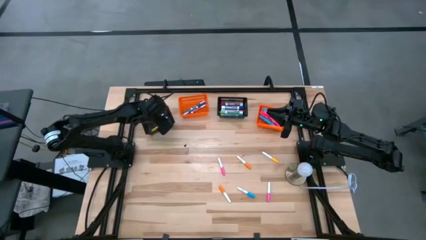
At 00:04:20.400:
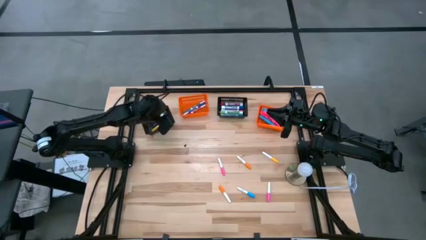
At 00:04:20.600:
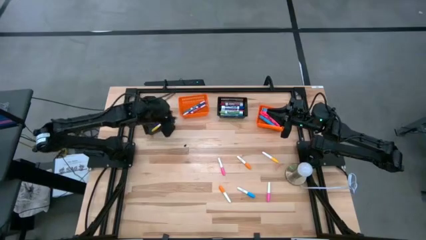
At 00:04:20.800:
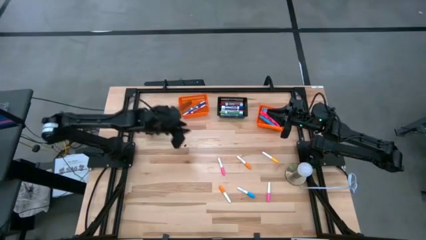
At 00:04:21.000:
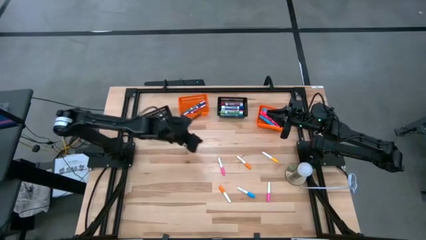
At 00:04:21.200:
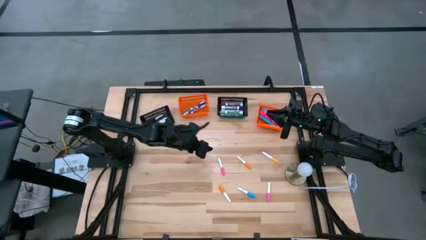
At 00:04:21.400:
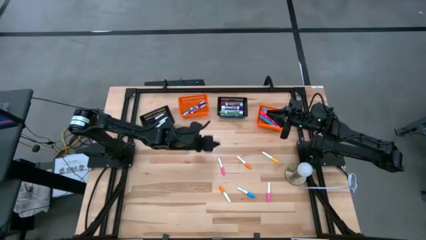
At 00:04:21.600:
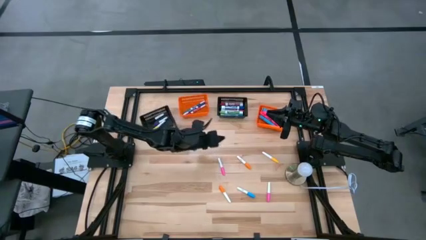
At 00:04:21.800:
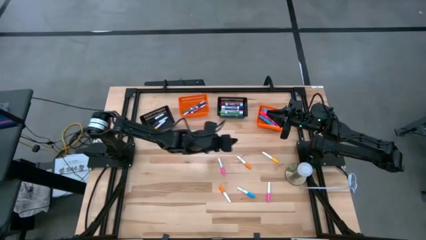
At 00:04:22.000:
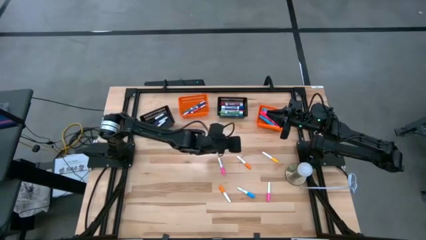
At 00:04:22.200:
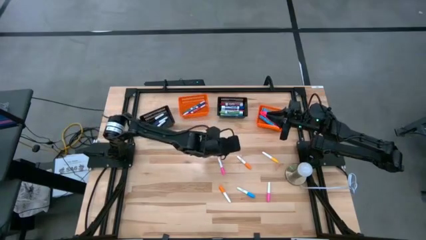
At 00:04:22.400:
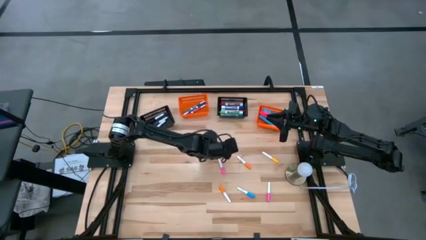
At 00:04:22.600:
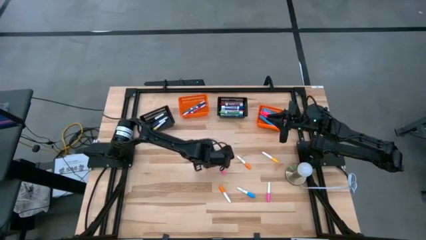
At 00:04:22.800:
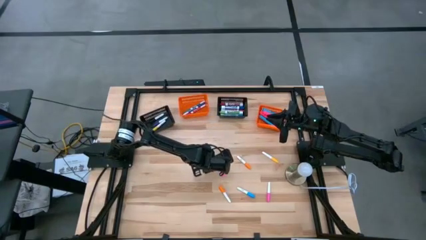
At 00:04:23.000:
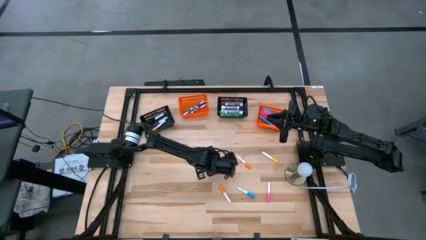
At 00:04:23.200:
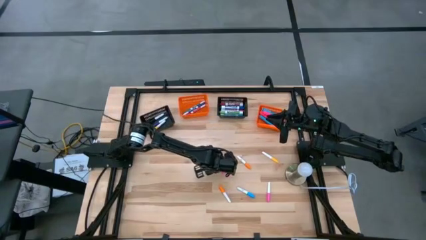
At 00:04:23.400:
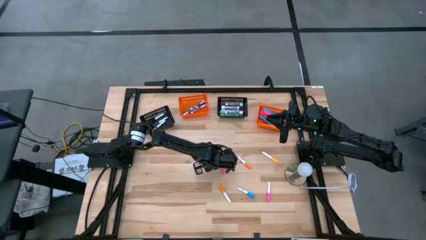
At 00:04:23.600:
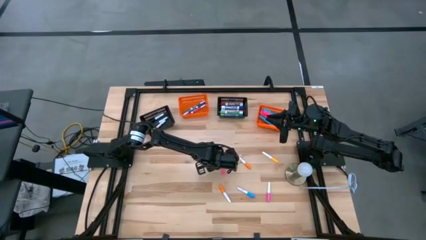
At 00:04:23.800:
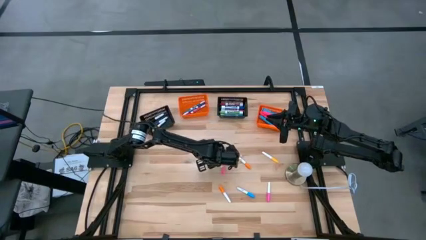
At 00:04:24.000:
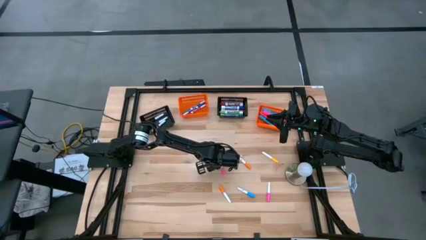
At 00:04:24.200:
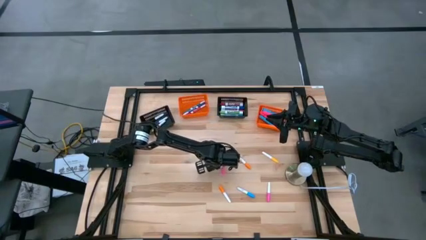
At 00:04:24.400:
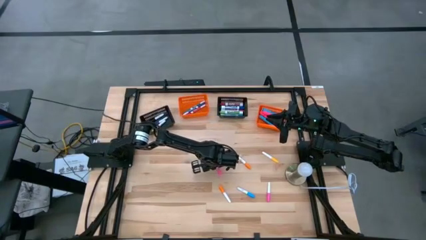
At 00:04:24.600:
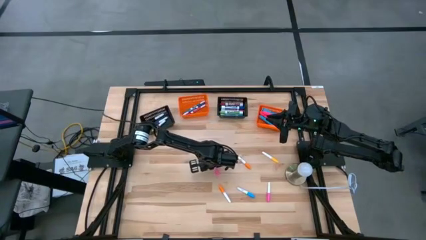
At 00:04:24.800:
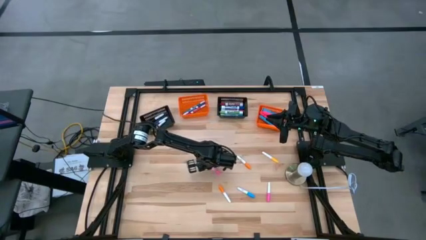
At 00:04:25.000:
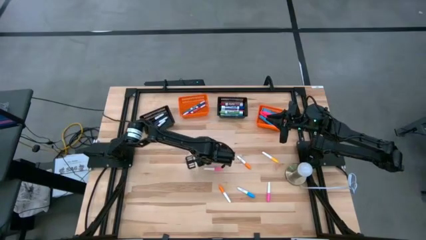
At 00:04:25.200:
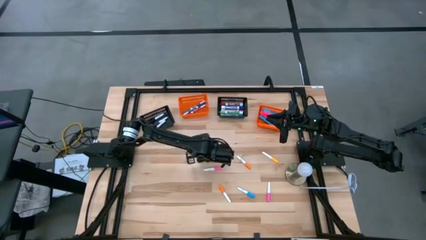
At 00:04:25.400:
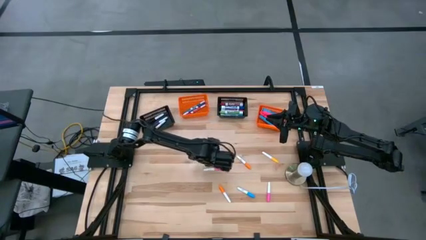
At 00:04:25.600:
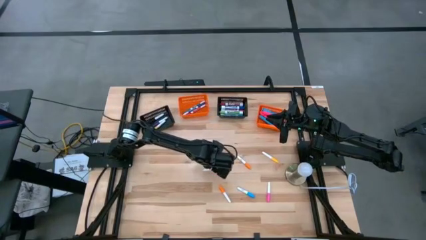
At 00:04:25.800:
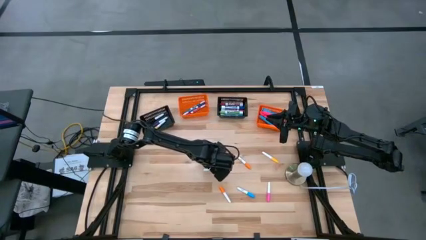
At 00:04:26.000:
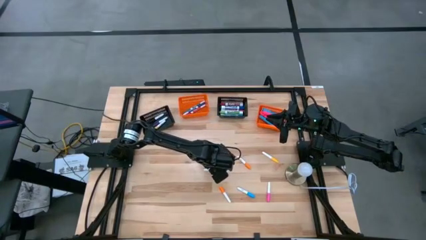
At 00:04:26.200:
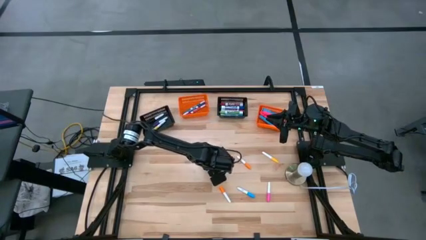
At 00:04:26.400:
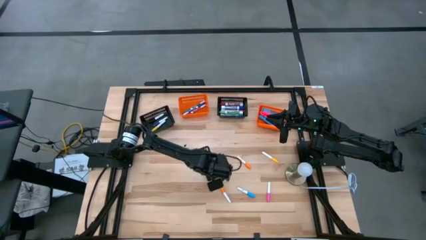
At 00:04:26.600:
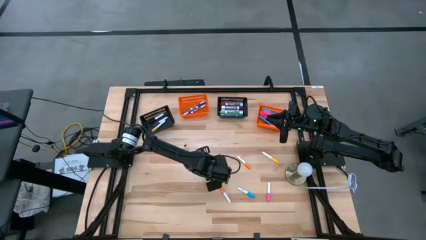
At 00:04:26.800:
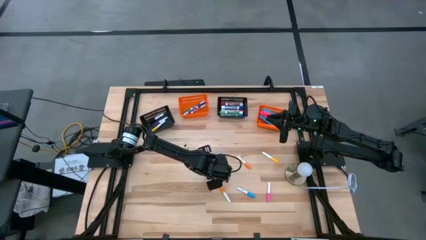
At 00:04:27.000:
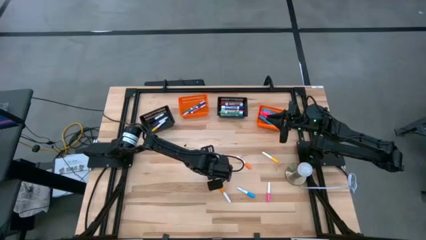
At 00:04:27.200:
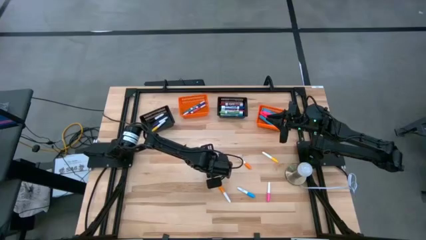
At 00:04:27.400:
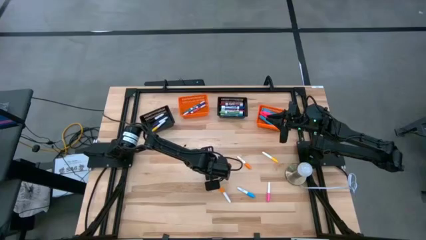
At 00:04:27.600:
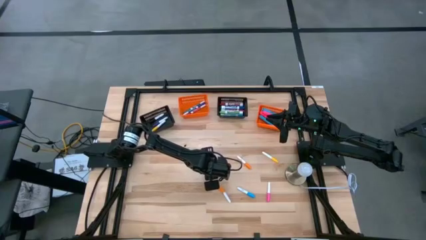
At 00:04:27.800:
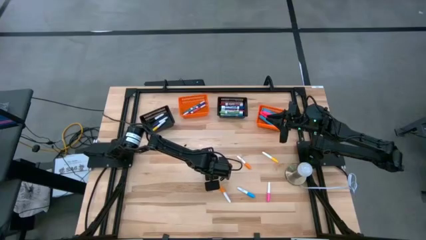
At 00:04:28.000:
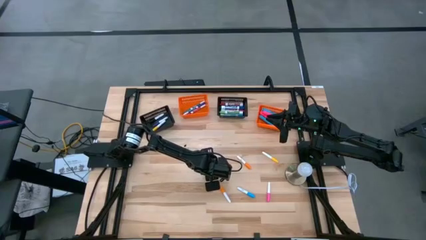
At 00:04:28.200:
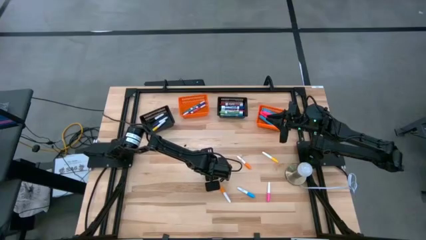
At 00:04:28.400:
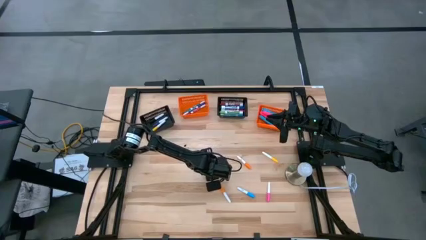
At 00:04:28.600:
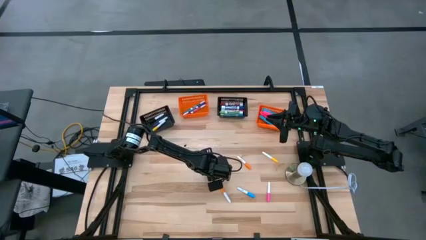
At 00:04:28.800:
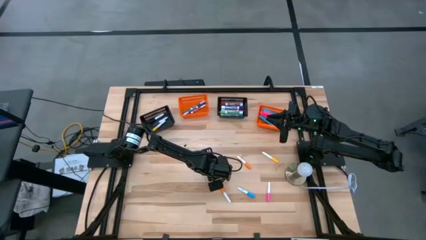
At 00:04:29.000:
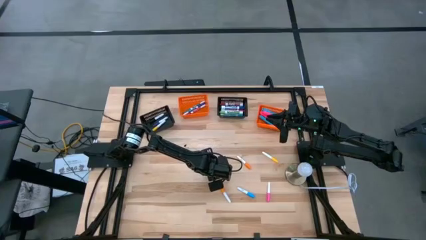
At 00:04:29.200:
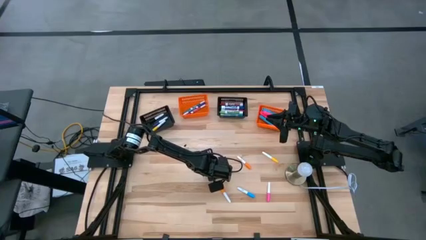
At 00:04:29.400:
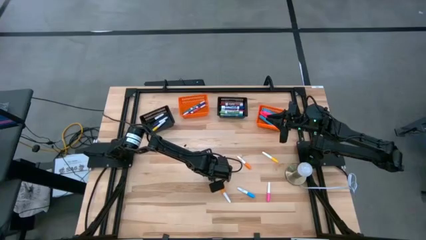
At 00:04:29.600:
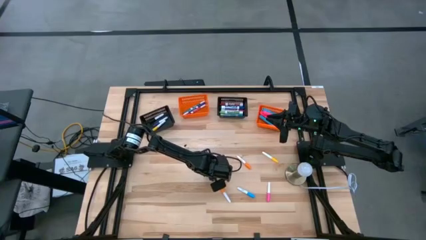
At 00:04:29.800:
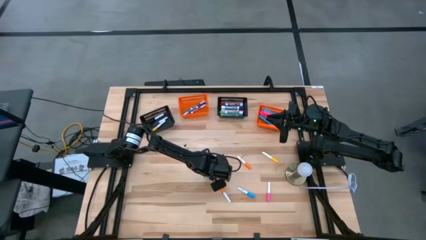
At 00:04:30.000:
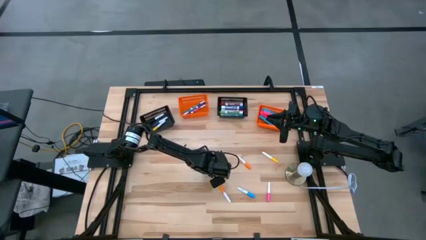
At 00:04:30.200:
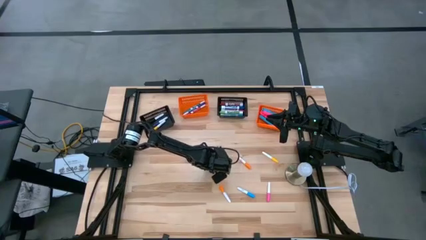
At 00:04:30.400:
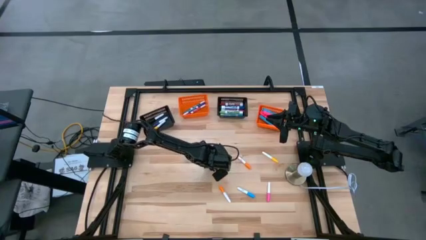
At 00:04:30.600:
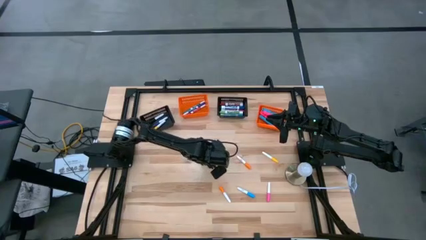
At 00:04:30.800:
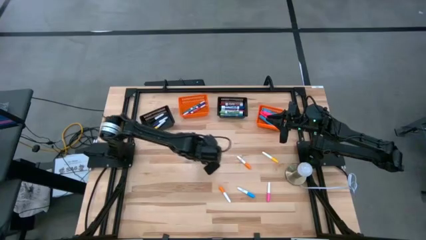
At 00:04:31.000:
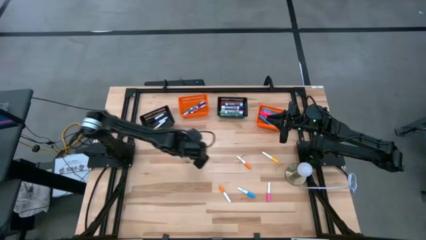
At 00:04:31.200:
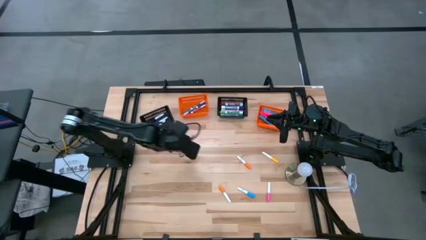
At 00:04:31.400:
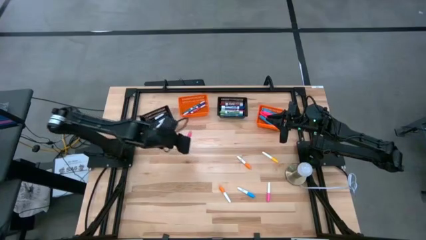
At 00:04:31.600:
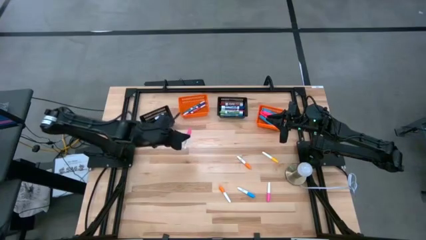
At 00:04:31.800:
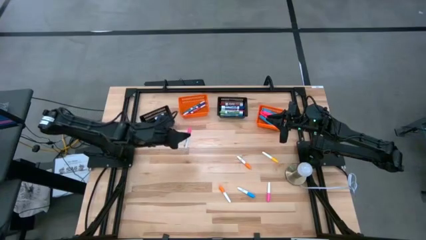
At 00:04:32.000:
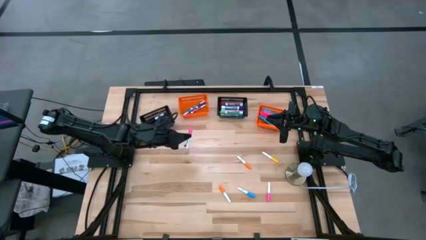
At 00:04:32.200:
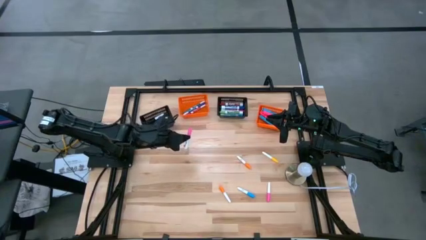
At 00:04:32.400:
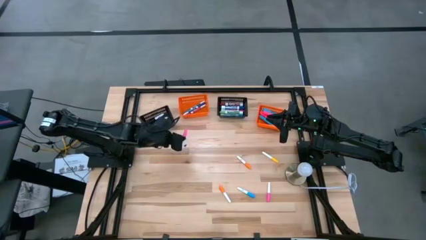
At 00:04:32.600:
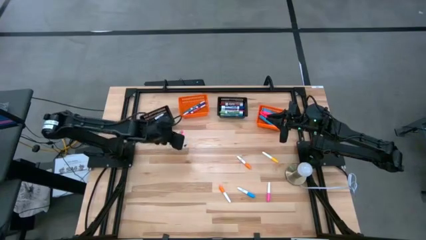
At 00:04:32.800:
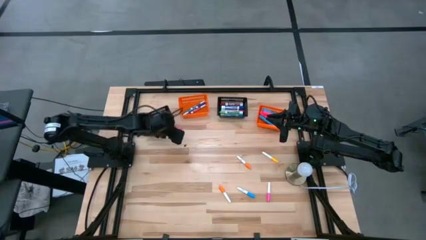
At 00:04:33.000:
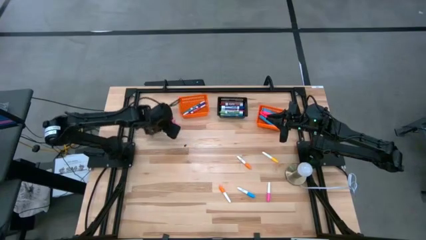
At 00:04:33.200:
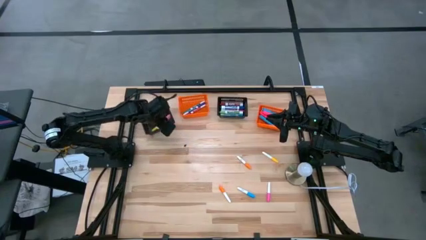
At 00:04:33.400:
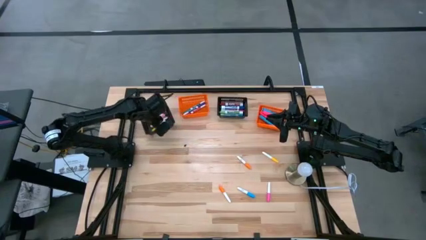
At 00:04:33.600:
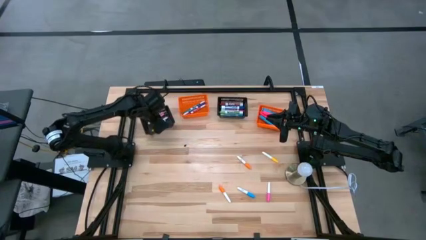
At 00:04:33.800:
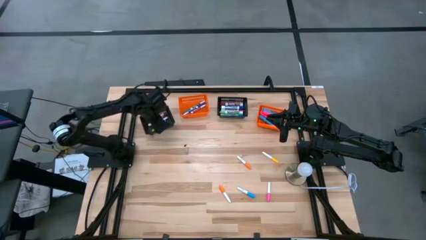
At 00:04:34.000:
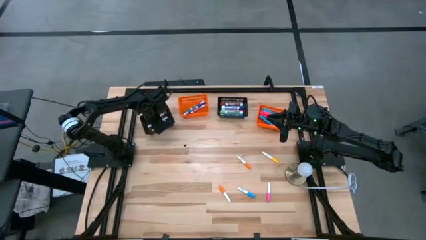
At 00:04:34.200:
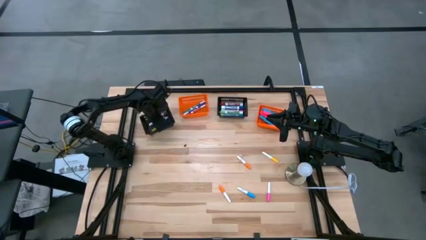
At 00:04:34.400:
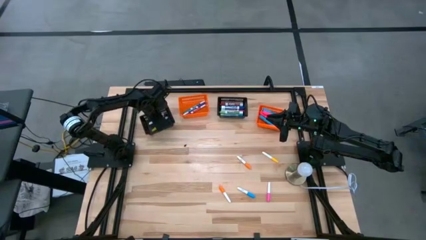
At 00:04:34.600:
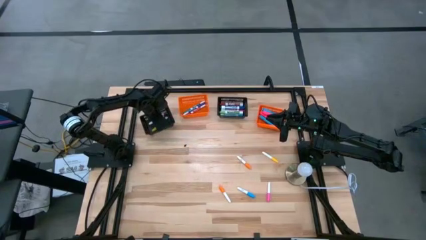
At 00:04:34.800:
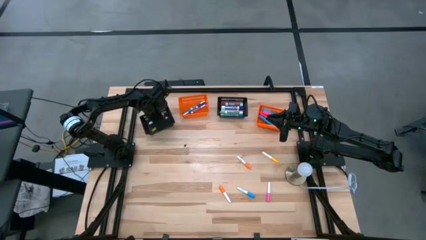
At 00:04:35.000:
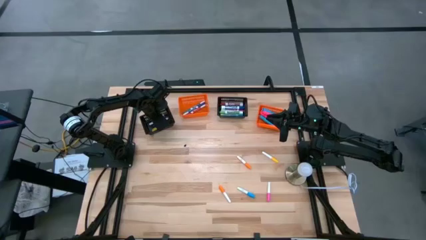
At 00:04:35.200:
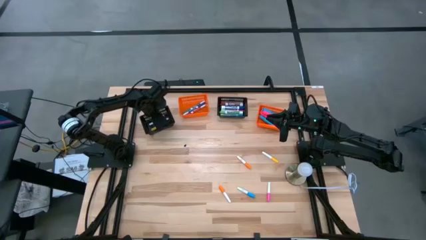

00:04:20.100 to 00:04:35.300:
Task: Pick & Place Markers
Put the left white pink marker into the left black bin

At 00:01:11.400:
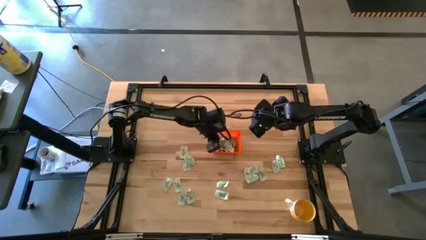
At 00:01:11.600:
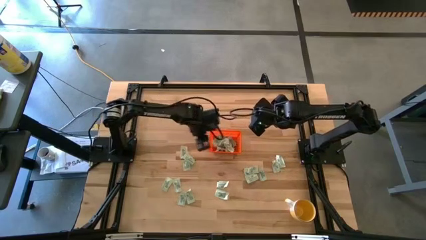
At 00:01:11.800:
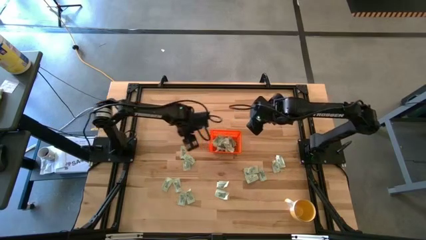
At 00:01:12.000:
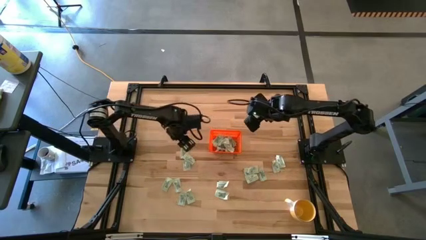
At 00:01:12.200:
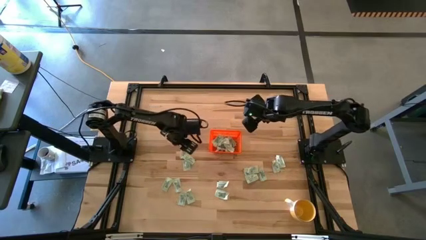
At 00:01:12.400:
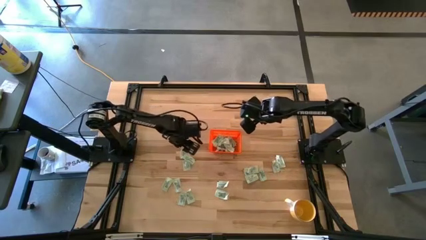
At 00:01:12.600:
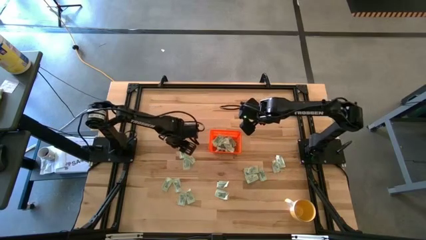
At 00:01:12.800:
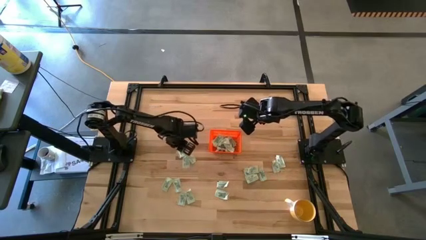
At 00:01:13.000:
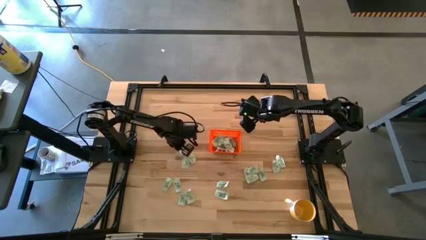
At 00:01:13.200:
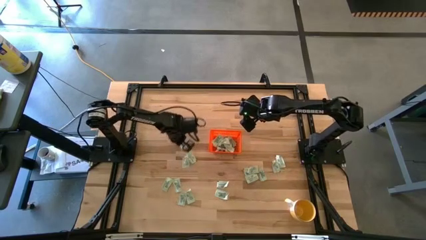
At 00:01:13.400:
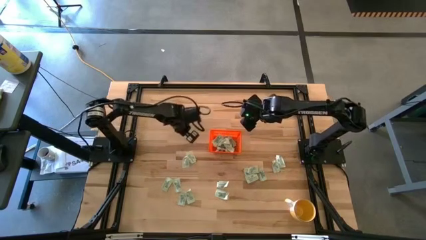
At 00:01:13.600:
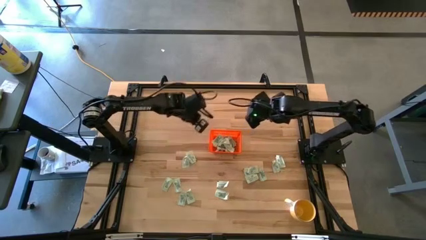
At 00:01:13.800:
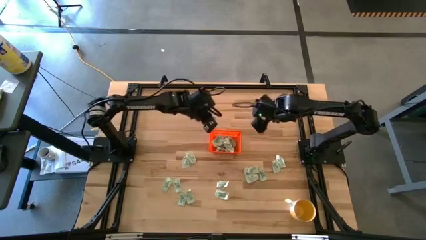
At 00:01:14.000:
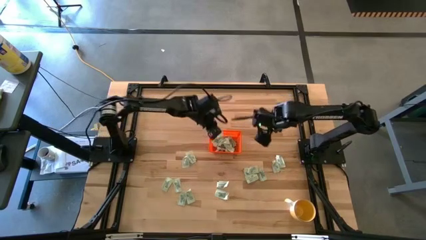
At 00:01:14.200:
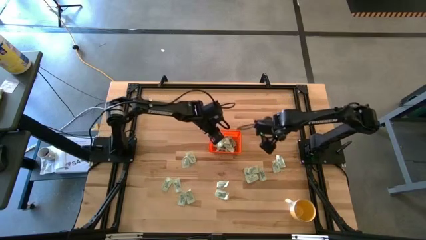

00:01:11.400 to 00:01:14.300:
Task: Pick and place Stevia / Truvia into bins
Put the light green stevia packet into the orange basket
